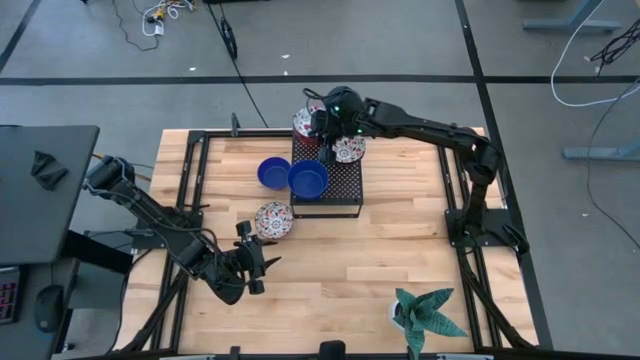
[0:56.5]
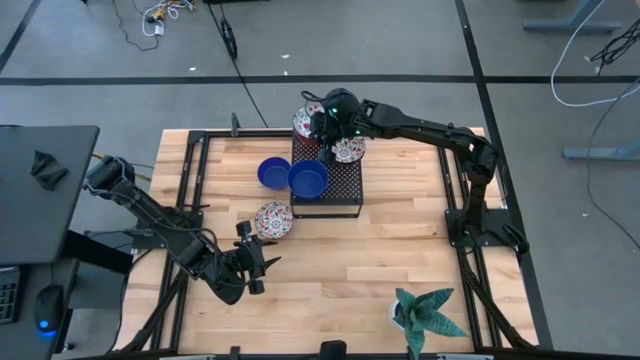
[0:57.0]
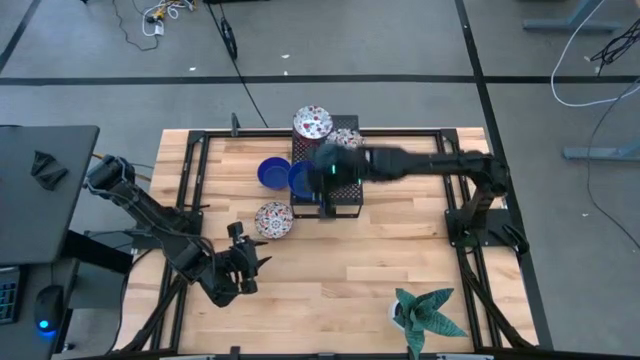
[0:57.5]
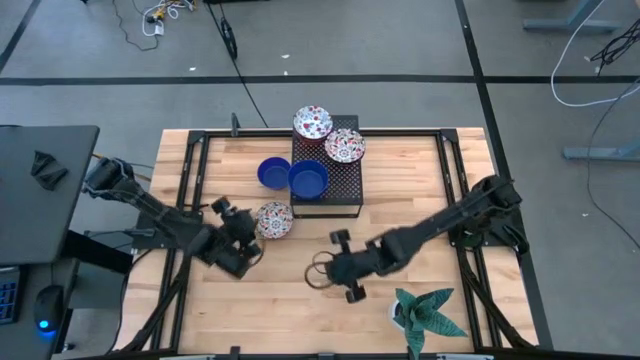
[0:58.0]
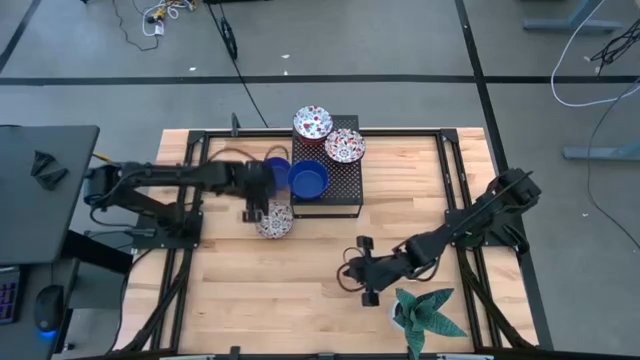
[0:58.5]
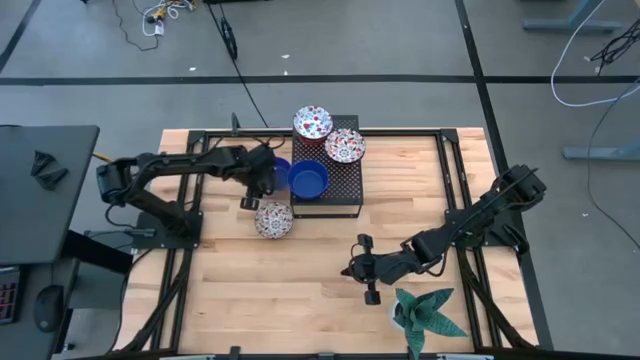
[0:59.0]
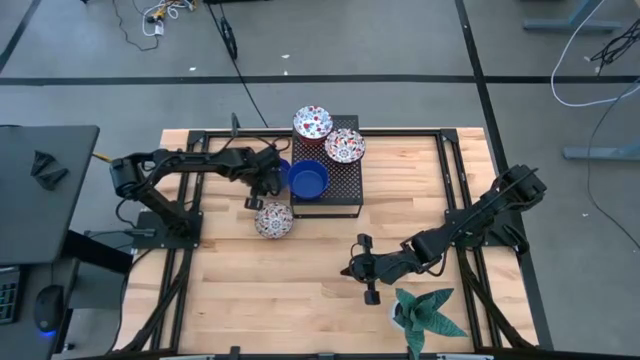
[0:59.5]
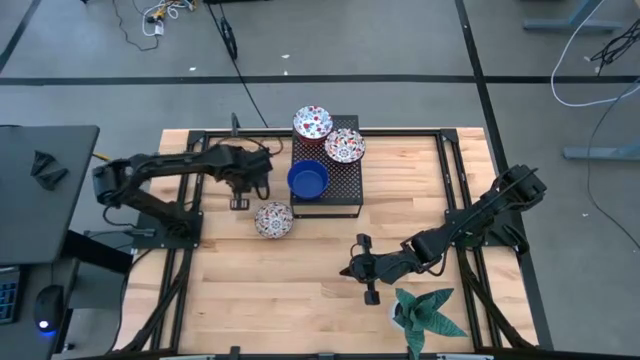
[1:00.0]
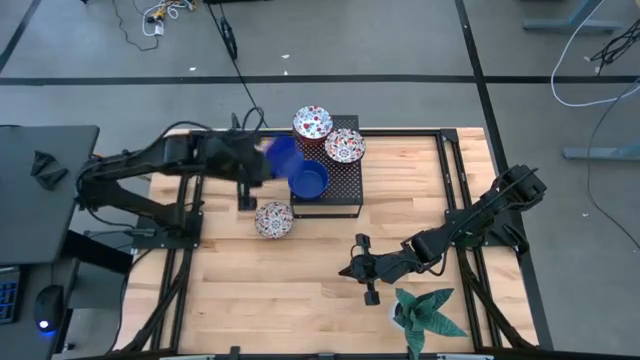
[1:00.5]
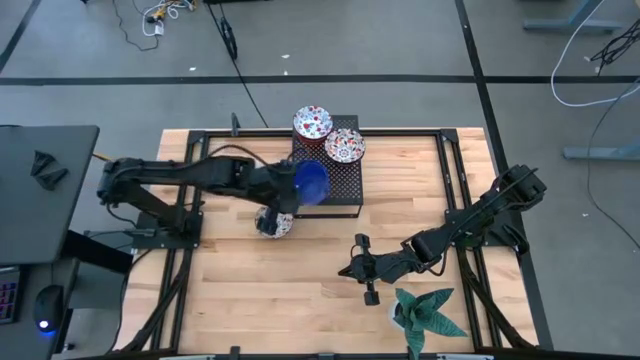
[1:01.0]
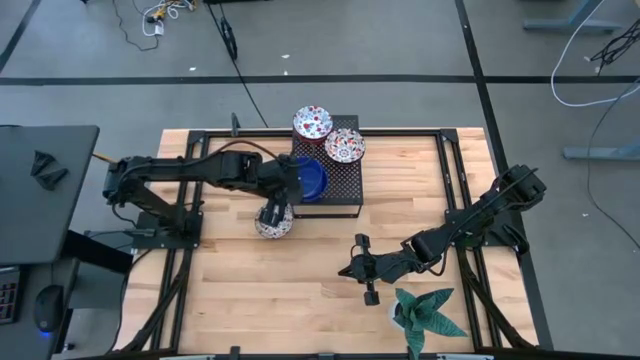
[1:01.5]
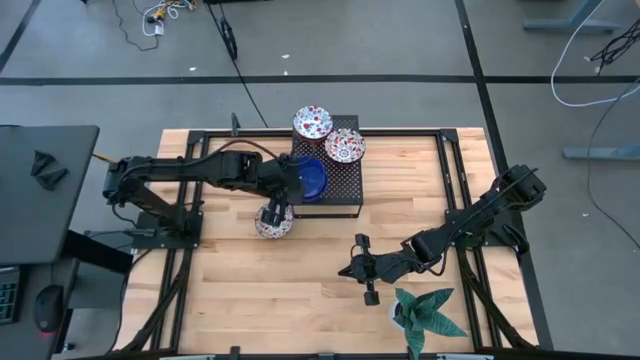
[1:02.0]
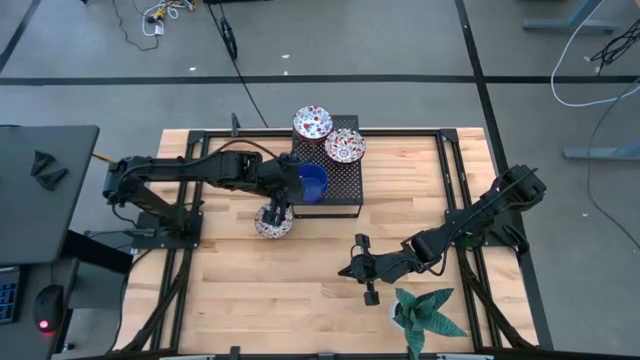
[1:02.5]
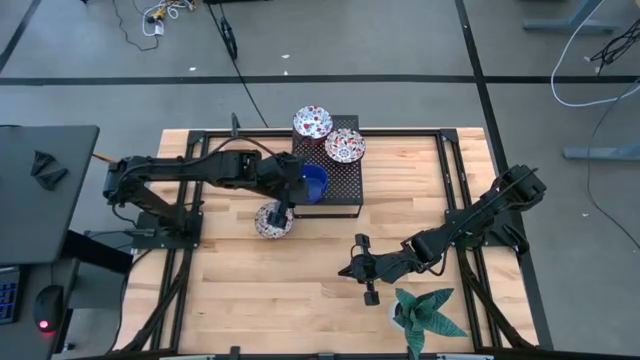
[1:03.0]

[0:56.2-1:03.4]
Task: Pick & Place Mini bowls
Stack the blue bowl on the blue bowl on the shelf

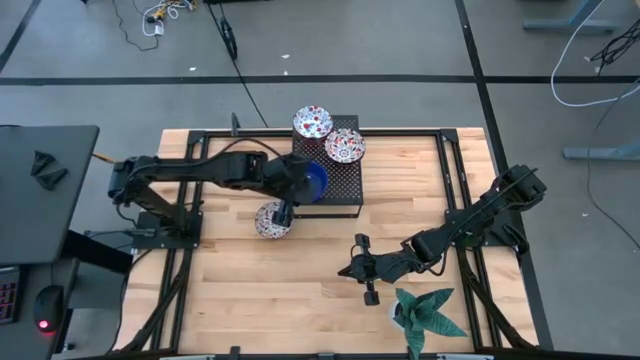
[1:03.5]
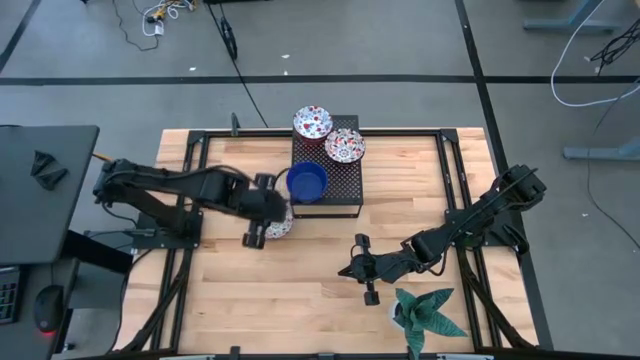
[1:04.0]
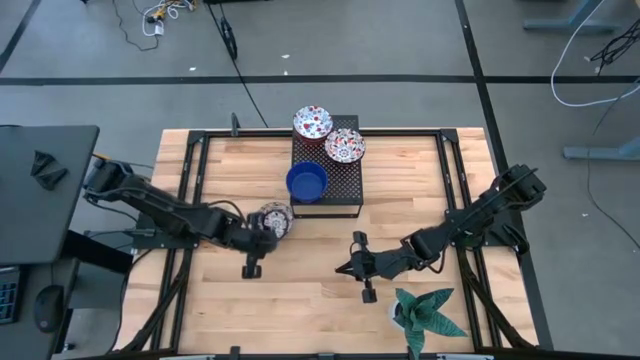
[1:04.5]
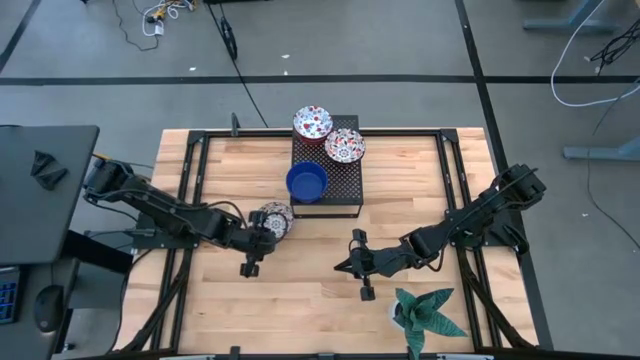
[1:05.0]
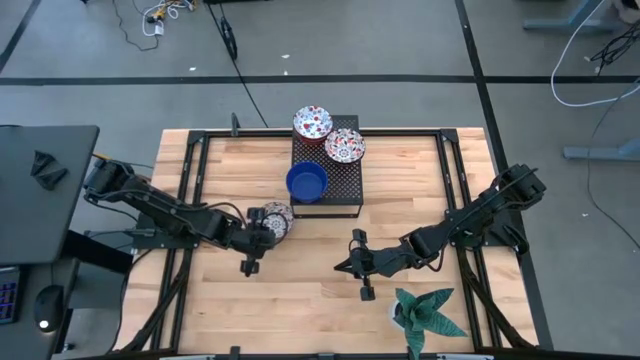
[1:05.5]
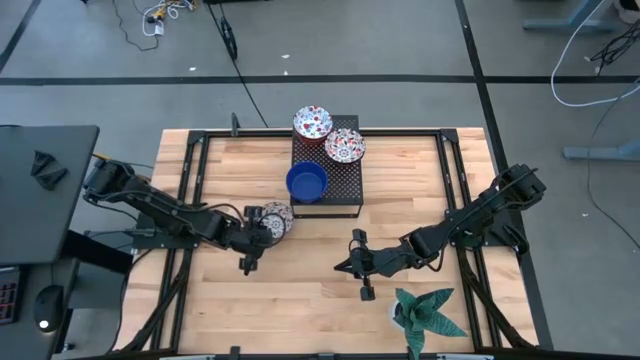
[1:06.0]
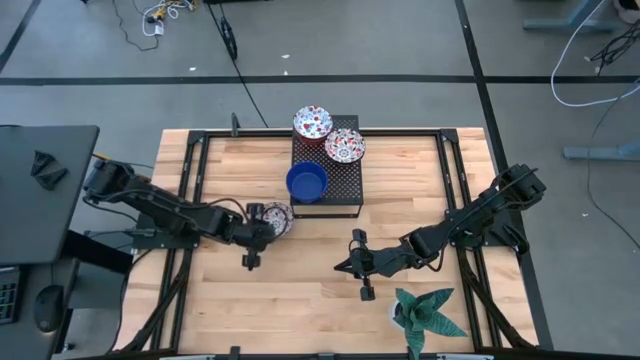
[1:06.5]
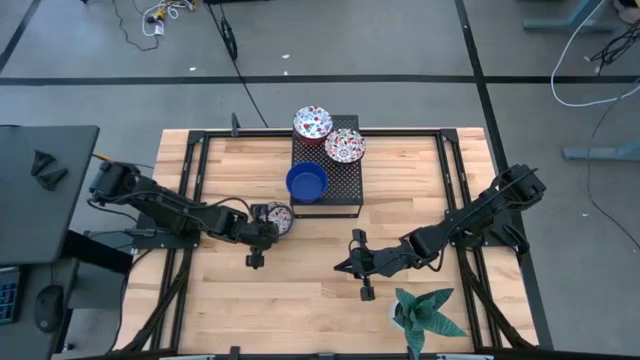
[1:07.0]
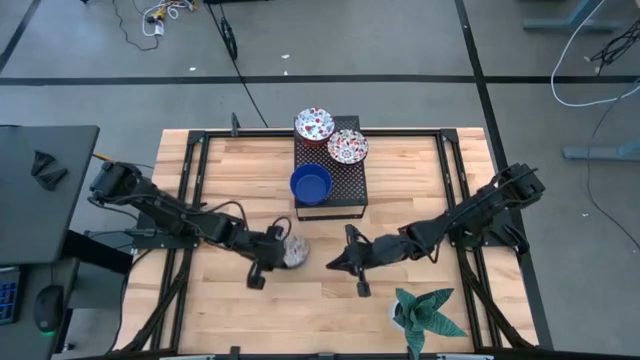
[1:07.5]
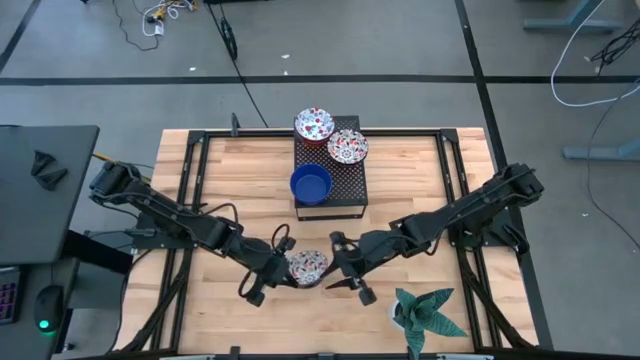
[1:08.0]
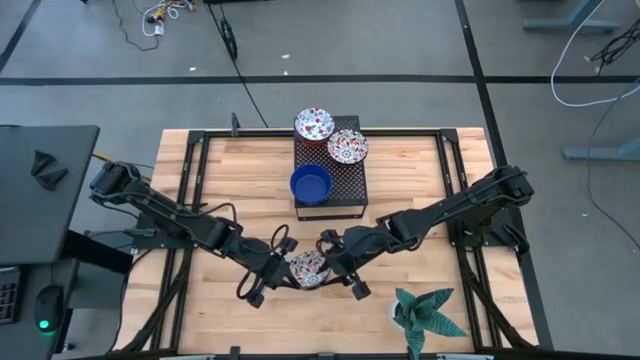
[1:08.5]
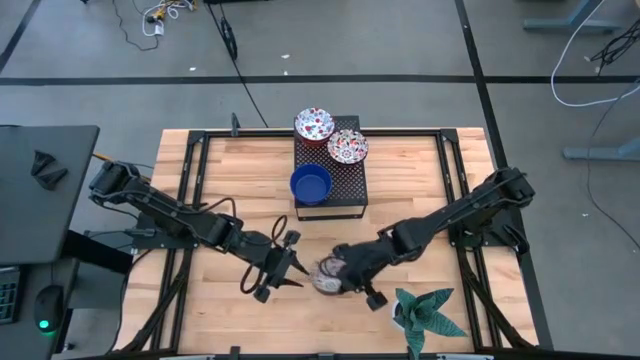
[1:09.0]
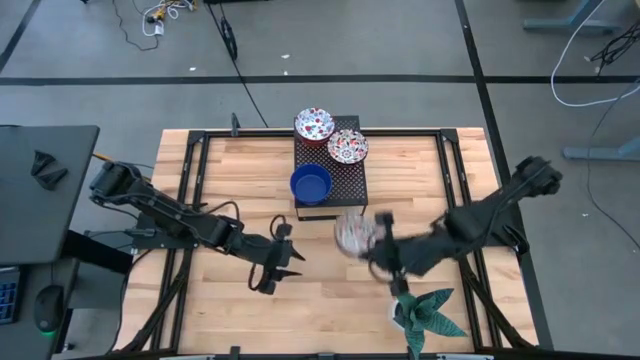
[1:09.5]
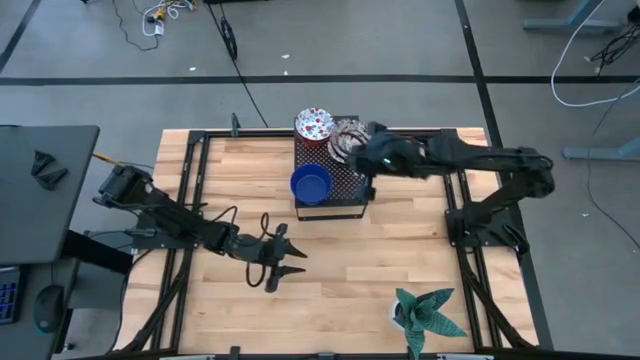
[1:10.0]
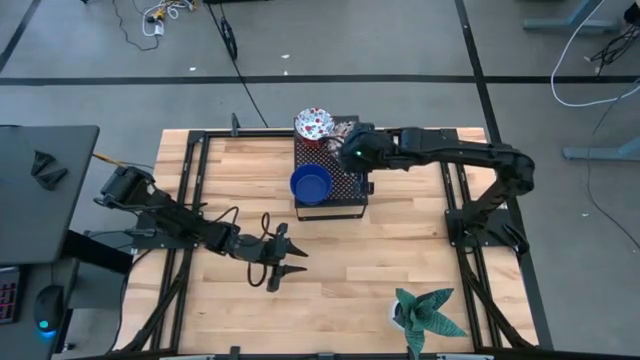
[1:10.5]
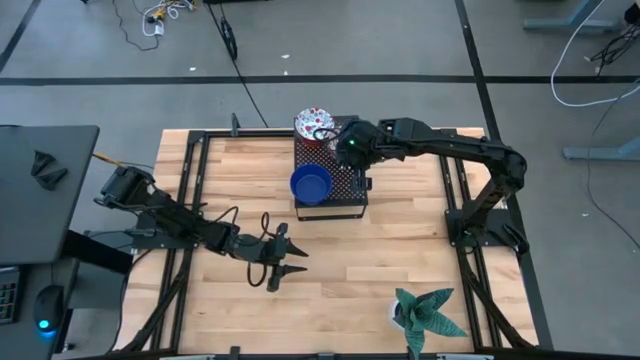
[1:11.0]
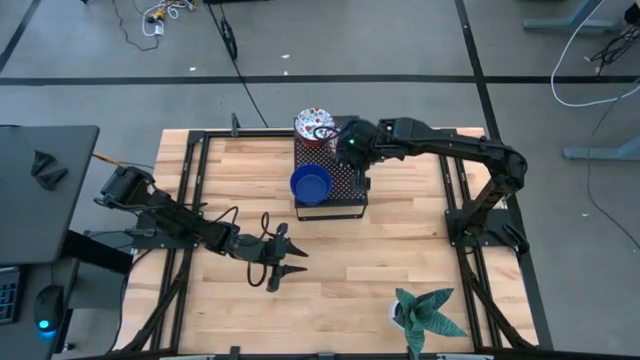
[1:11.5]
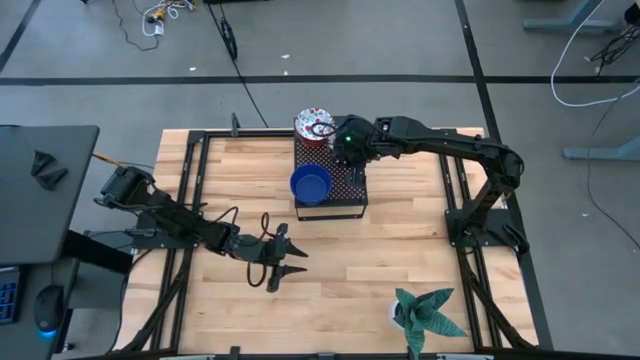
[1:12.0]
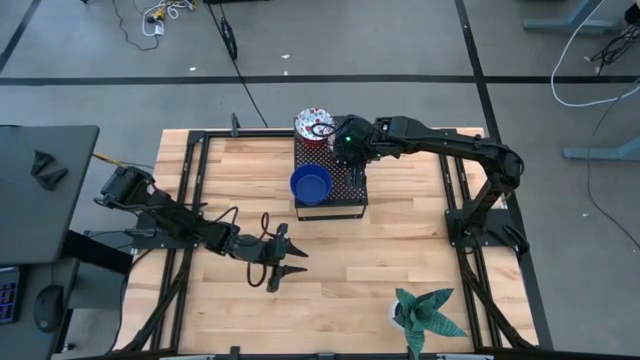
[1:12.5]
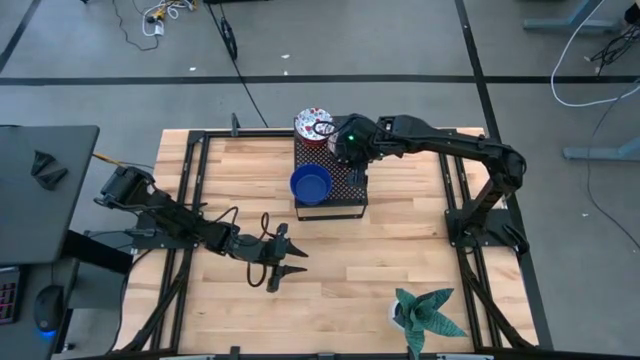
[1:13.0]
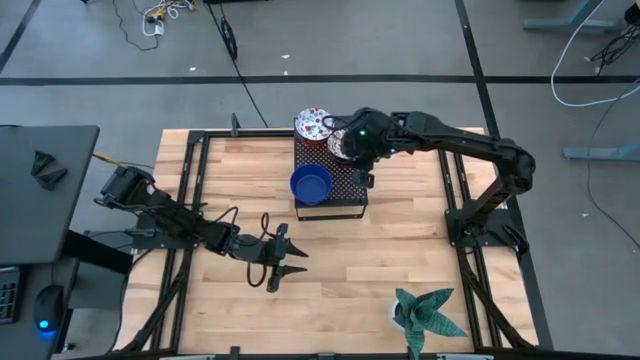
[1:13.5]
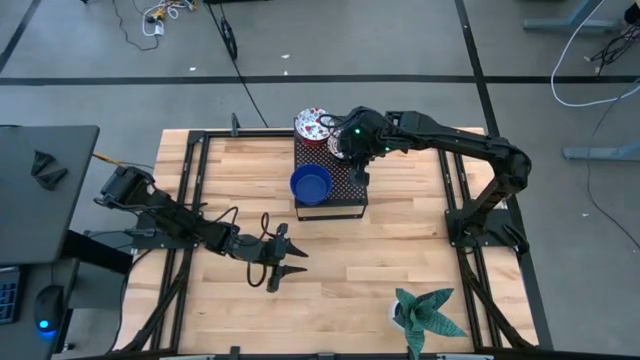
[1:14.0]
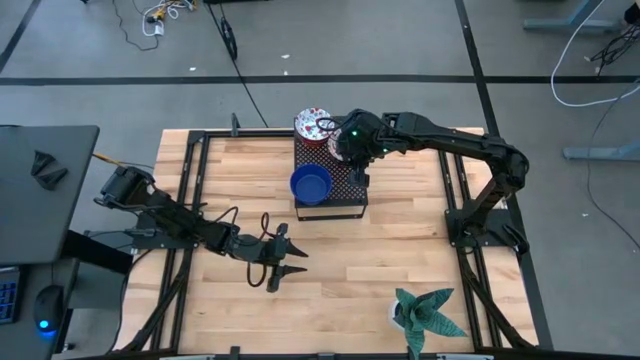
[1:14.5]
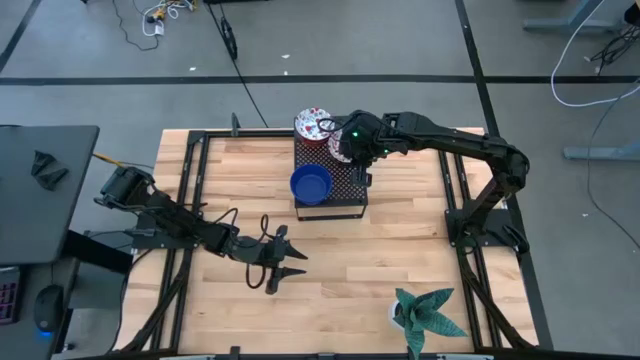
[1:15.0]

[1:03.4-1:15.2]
Stack the orange patterned bowl on the orange patterned bowl on the shelf

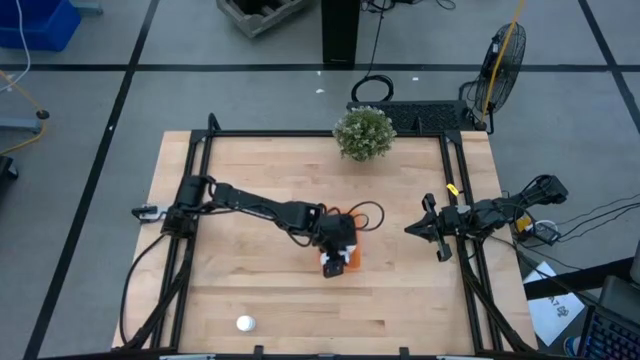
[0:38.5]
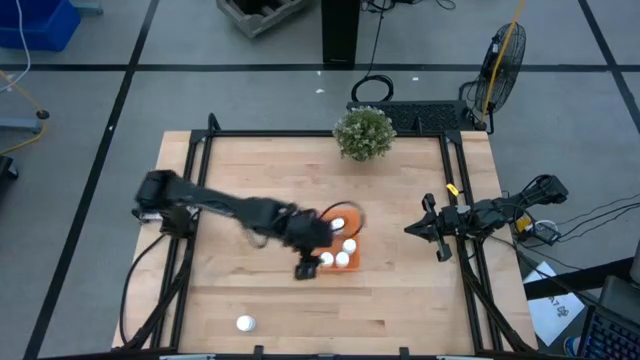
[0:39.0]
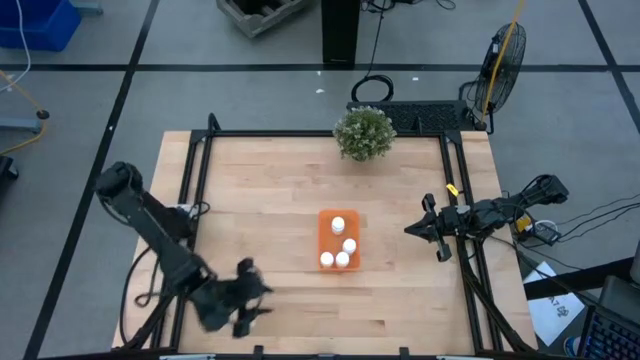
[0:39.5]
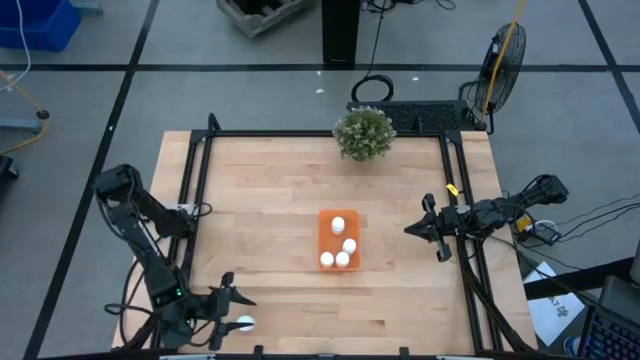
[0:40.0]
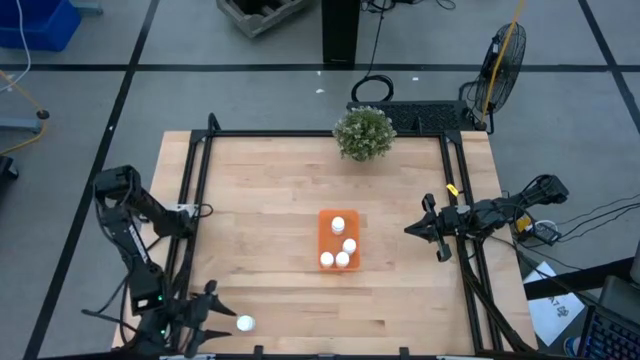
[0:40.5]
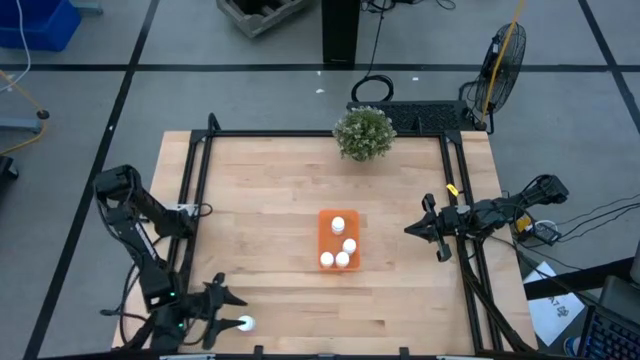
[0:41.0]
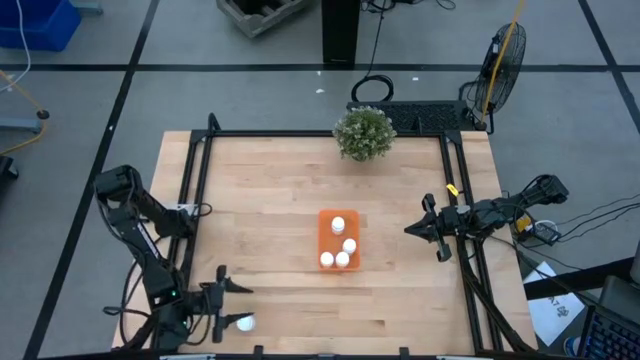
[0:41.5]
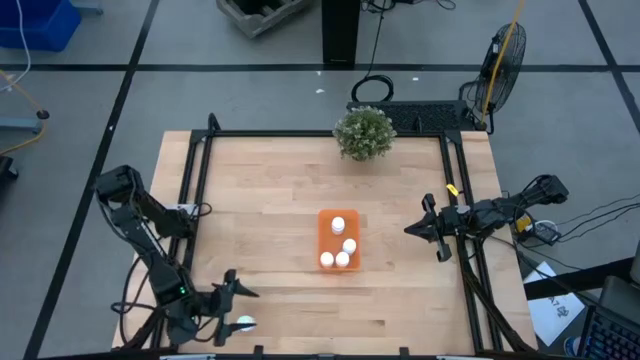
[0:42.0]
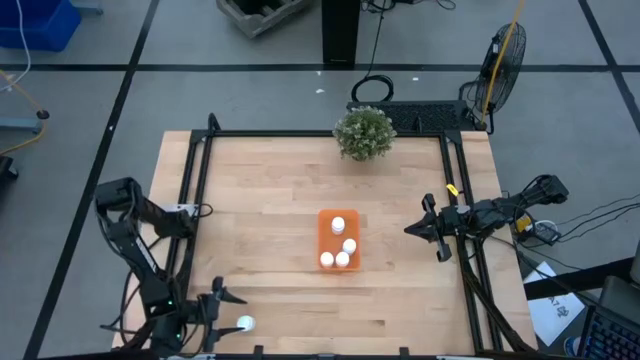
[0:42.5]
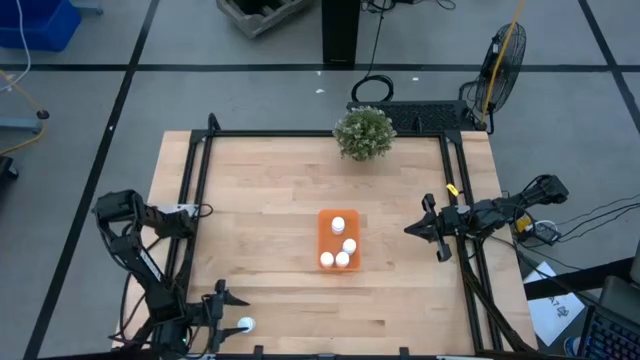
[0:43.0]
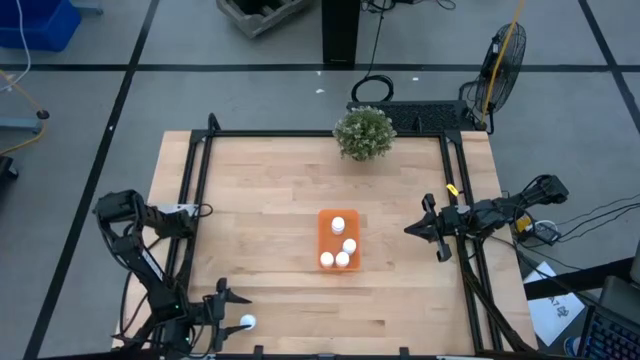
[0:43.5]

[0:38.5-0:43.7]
Task: Pick and place pill bottles into a basket
Put the white medicine bottle into the orange bin
